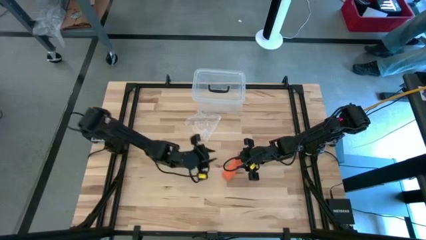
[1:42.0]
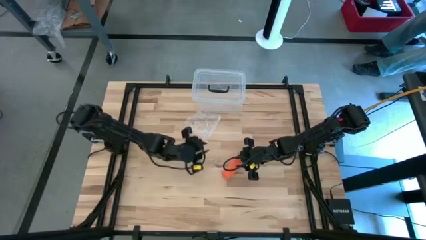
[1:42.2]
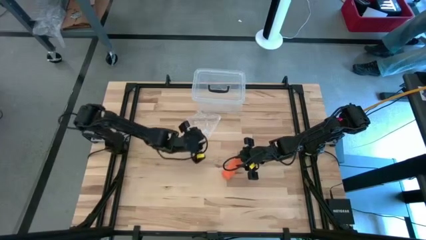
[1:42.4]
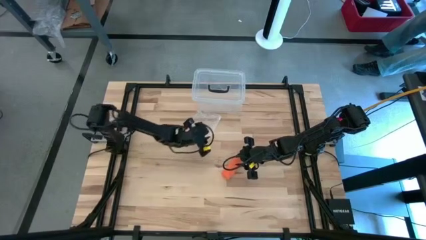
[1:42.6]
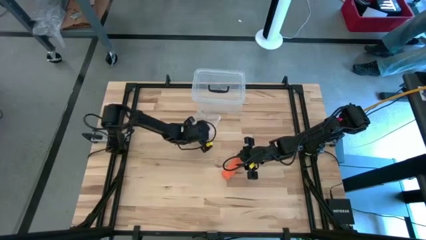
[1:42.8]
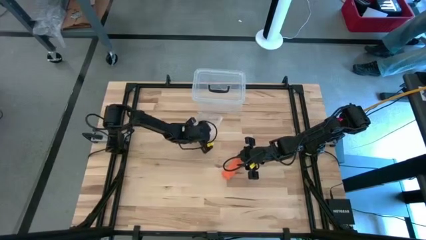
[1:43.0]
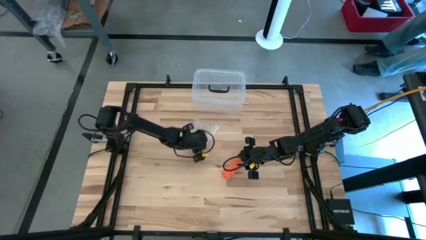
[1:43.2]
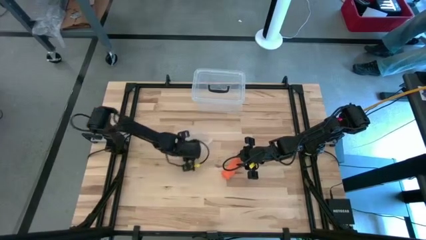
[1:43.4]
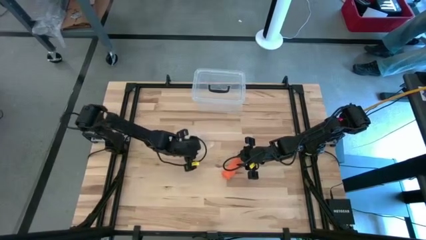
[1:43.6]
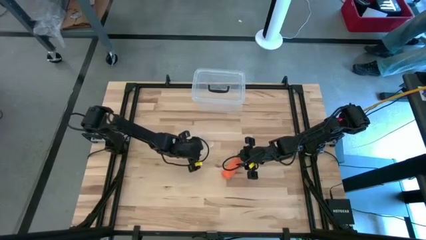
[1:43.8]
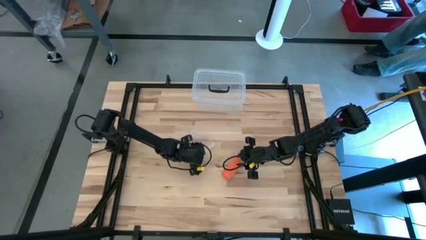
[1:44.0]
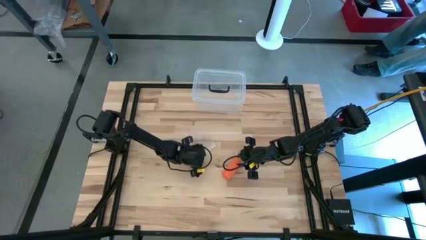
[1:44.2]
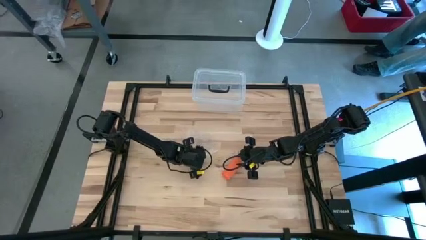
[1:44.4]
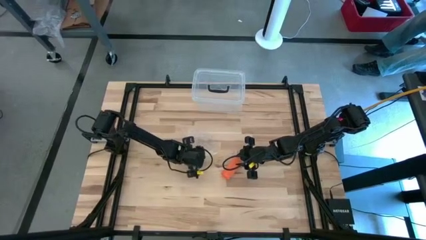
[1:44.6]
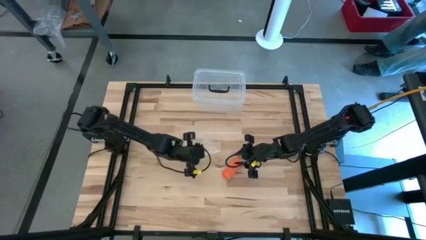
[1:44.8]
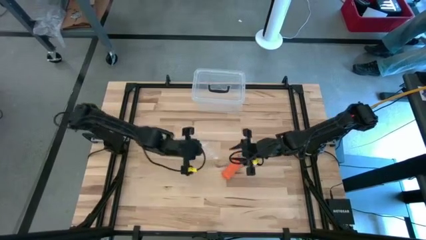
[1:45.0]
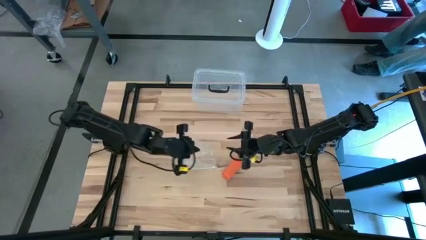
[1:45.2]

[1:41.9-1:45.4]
Task: Roll bandage
Open the zip bag

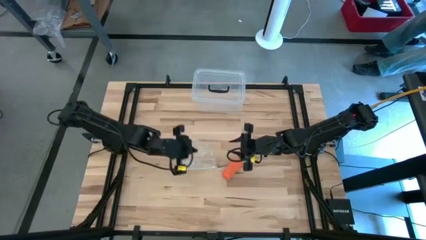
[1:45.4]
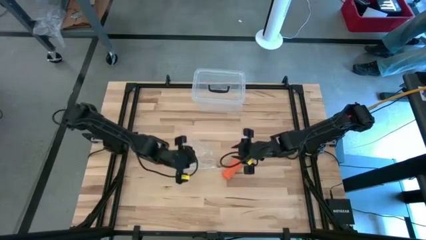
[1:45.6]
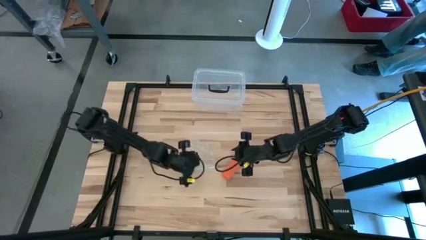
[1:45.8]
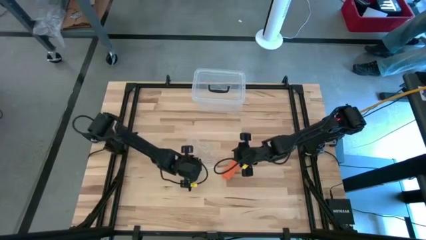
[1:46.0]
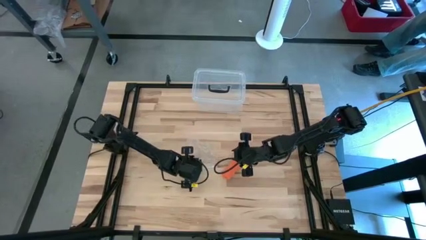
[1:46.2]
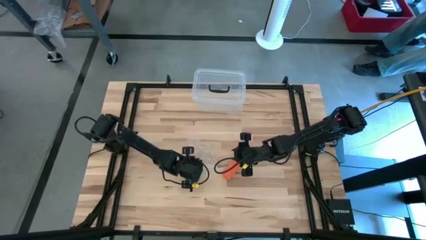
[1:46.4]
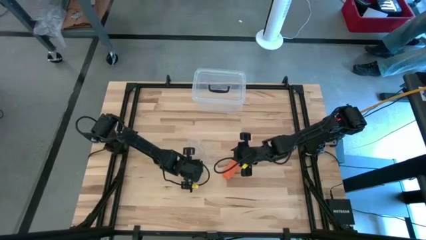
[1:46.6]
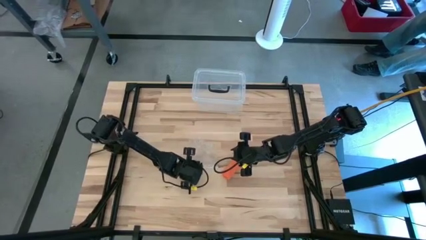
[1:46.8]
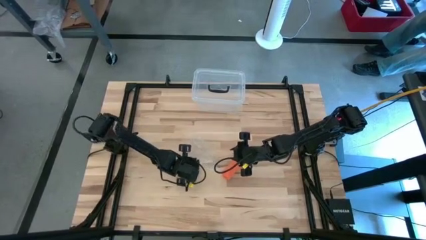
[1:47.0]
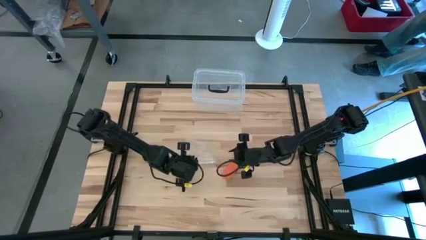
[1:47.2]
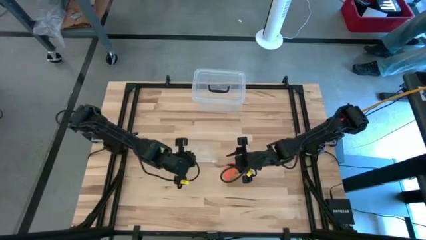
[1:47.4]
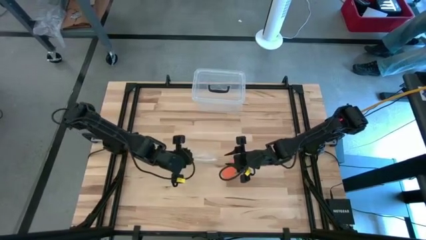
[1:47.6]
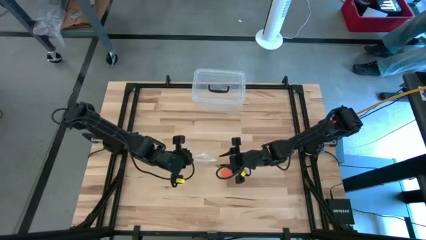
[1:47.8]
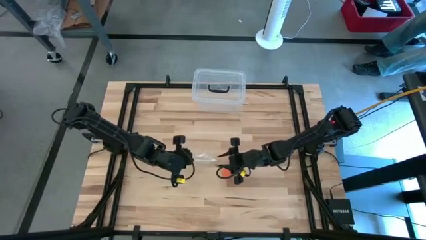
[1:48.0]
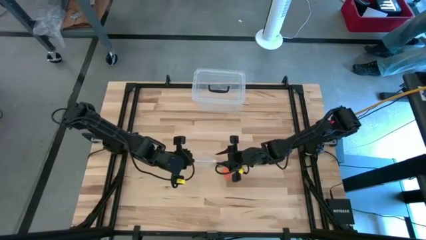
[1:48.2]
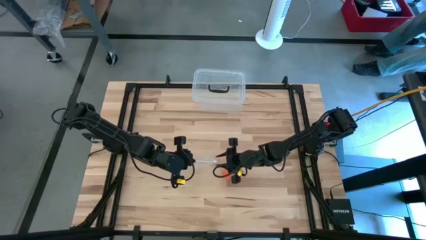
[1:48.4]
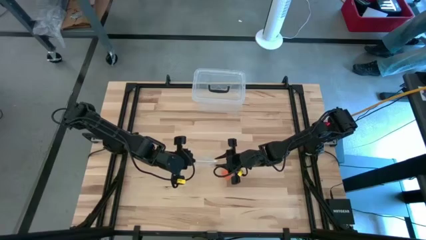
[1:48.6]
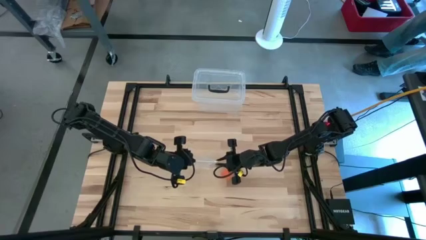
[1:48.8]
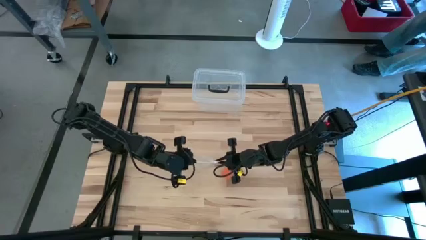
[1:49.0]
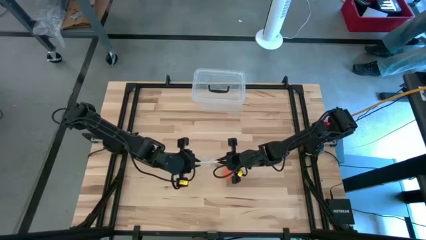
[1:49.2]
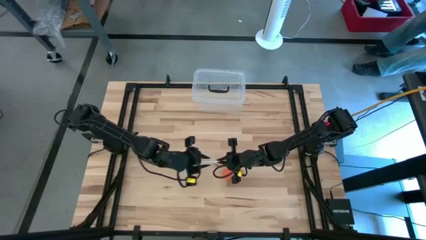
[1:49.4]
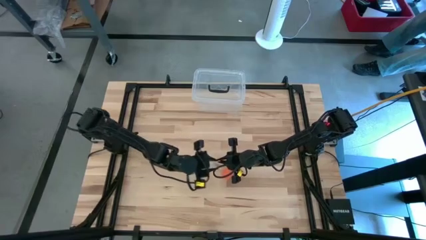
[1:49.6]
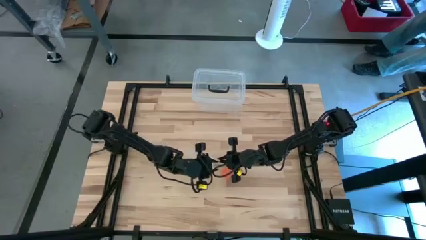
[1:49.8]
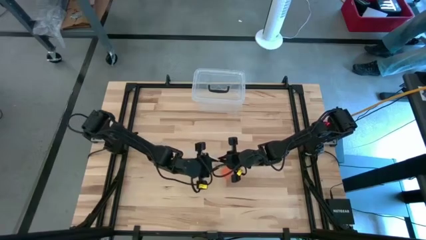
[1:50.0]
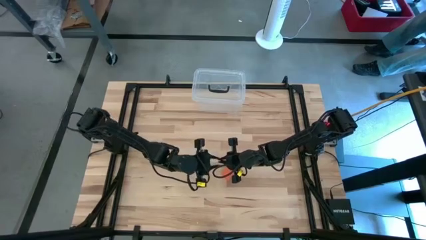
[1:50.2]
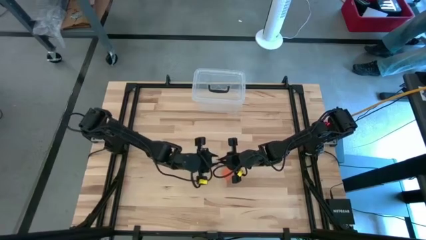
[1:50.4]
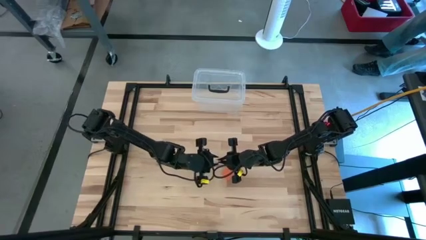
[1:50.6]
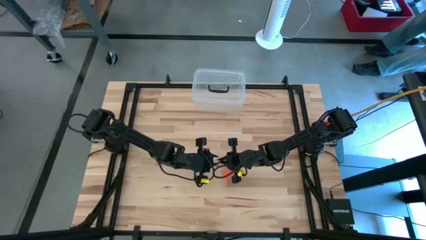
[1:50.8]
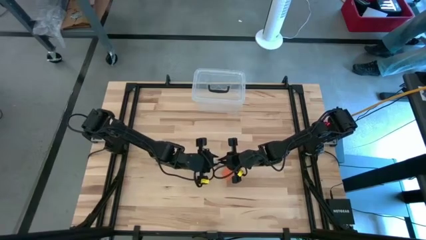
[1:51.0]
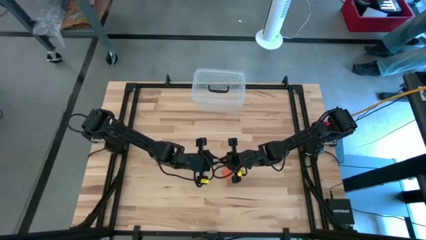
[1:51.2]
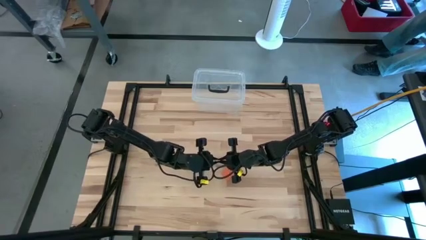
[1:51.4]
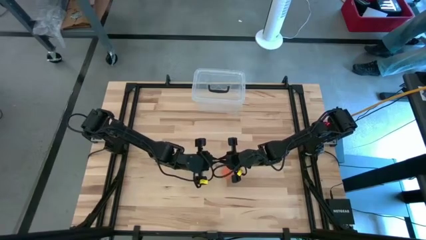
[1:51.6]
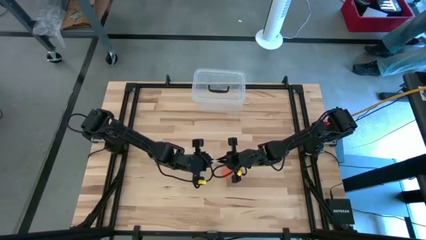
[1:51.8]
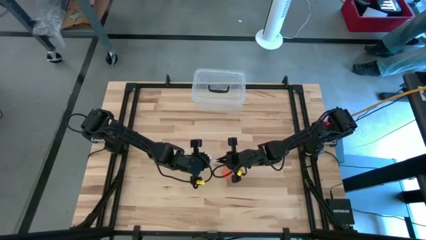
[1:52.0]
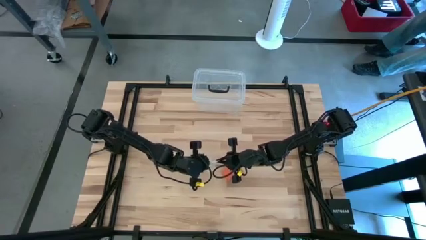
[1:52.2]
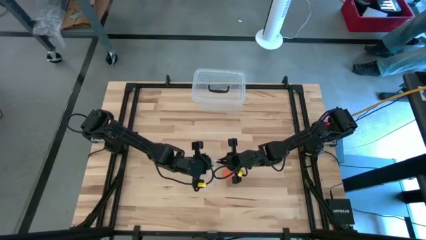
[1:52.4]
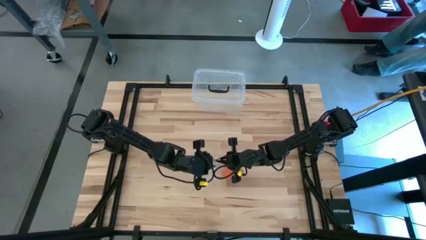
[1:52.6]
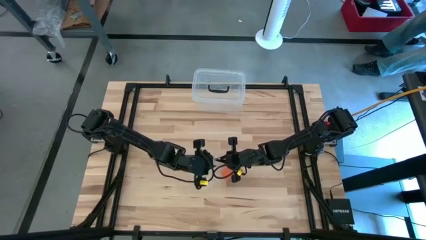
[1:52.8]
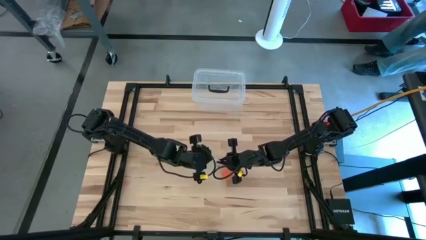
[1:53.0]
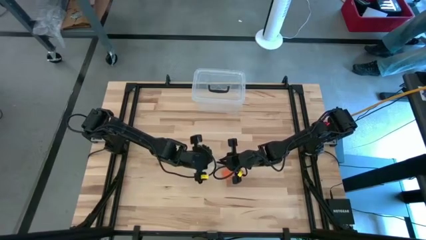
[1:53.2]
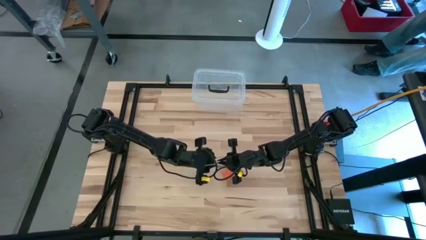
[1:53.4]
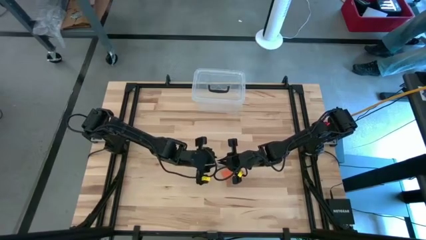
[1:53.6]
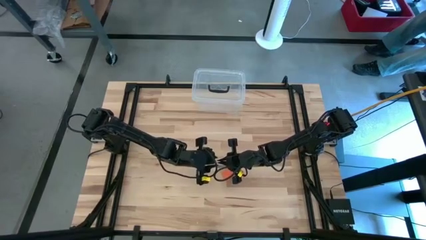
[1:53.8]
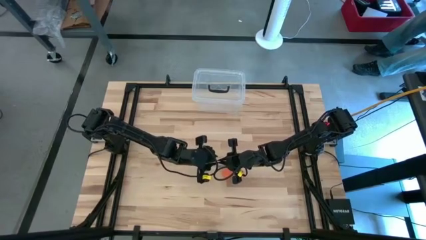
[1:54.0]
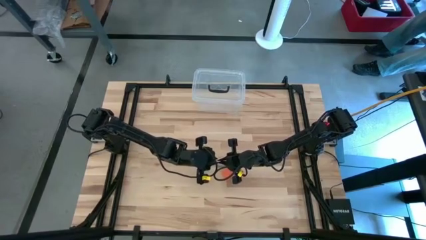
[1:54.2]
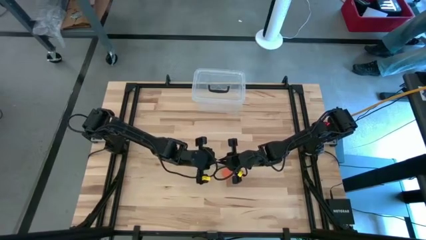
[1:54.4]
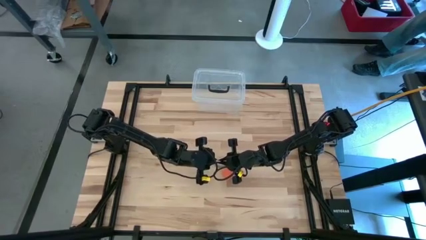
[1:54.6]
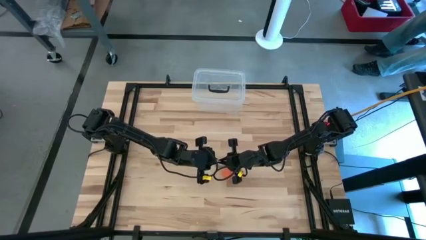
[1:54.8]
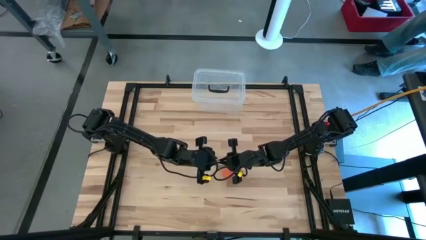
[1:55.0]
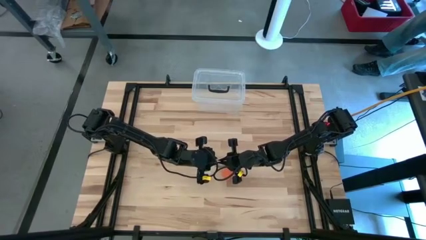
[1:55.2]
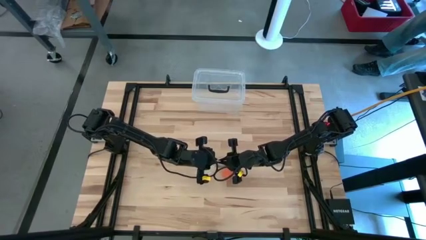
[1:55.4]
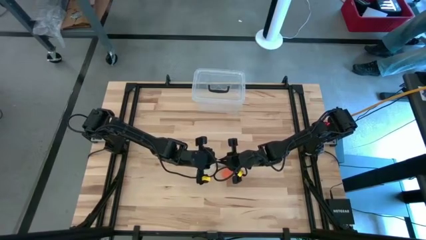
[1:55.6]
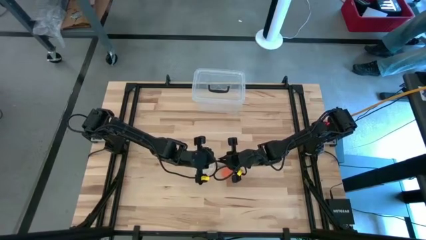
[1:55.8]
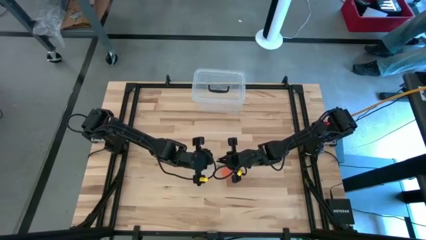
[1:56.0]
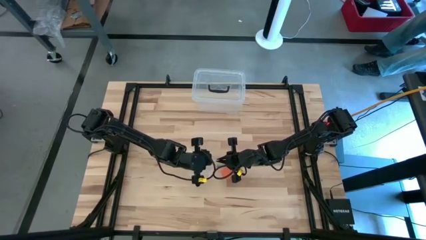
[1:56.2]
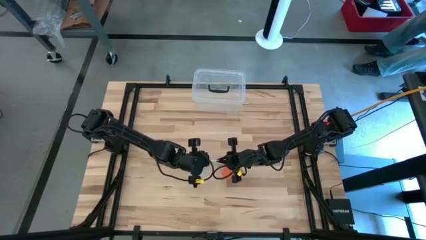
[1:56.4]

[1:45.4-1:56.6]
Open the zip bag

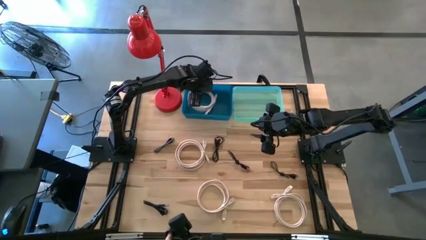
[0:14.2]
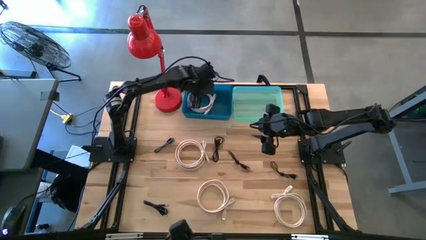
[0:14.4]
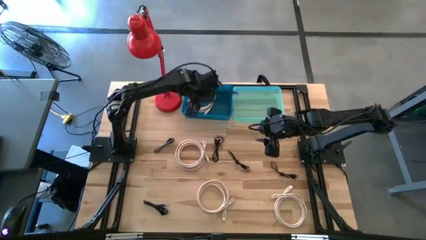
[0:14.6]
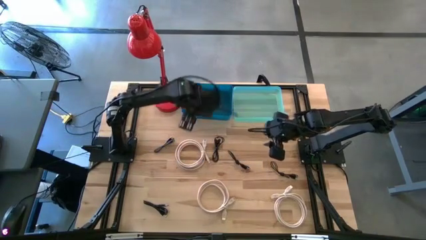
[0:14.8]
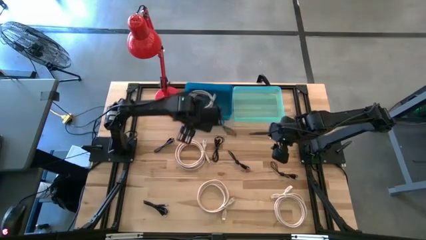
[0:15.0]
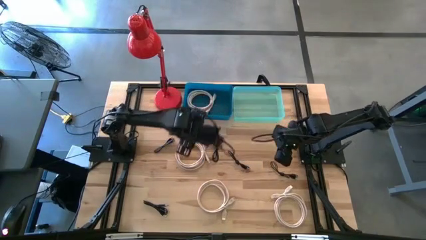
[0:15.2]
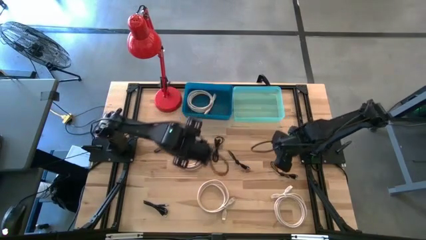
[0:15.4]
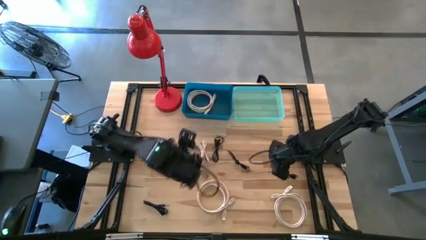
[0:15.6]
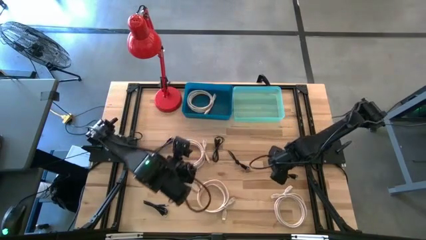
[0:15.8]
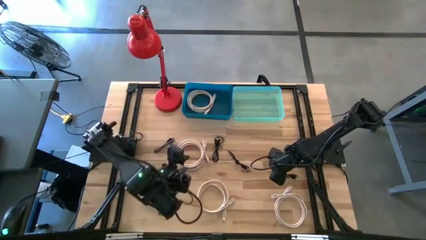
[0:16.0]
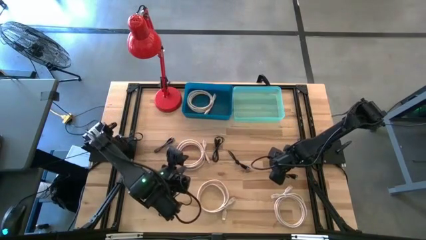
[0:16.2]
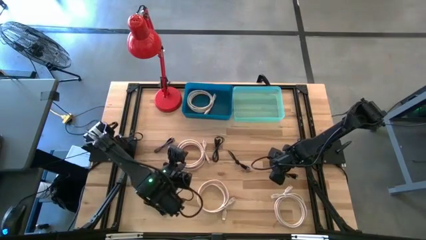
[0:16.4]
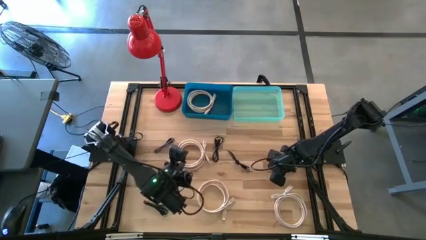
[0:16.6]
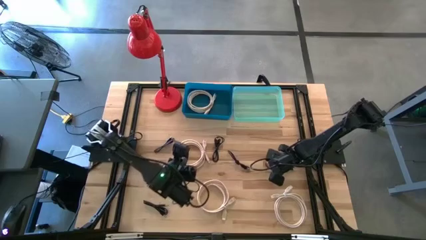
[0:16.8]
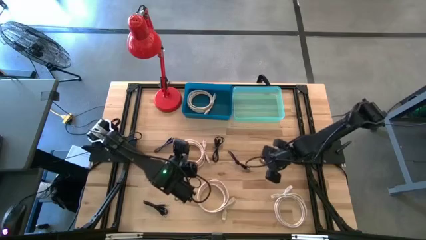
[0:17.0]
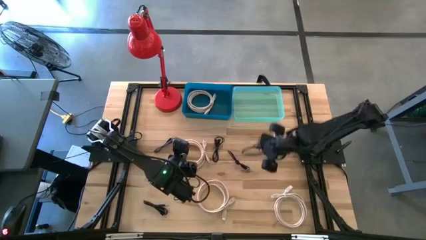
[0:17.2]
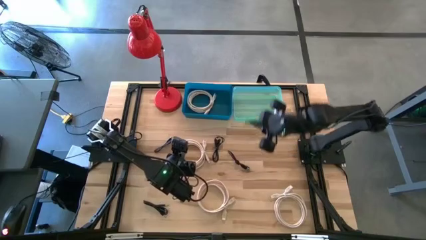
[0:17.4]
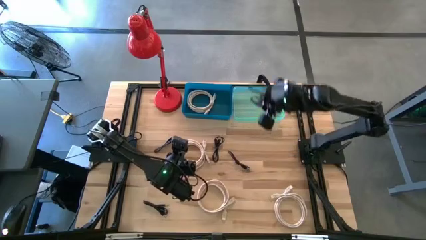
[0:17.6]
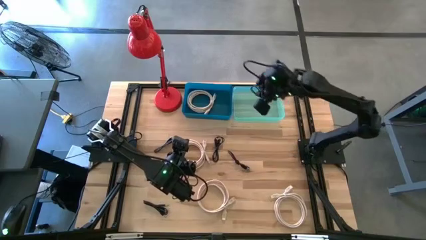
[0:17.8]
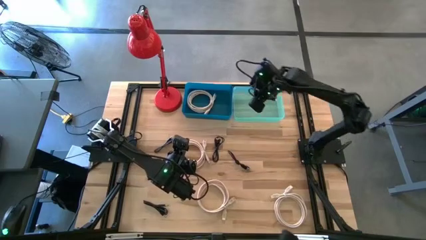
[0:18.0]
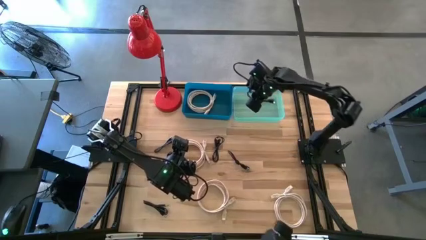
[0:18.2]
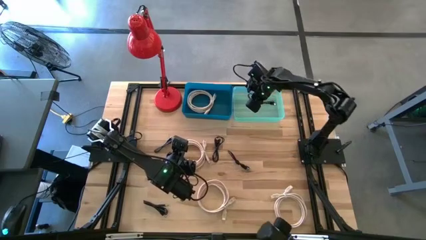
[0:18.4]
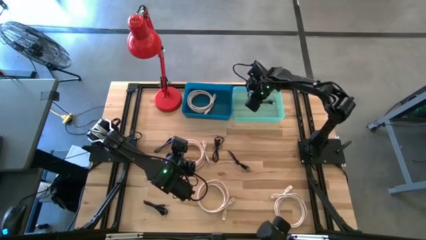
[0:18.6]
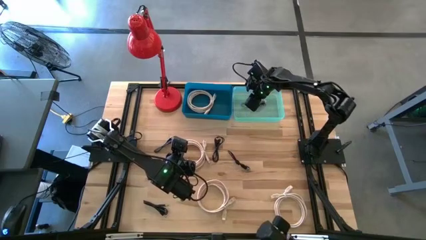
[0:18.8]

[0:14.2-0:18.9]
Task: Pick & Place USB Port
Put the black charger cable into the green bin
